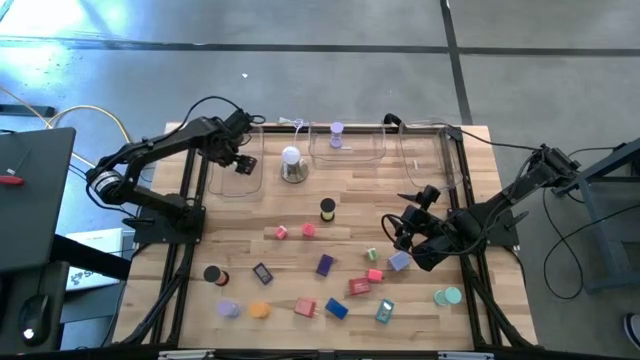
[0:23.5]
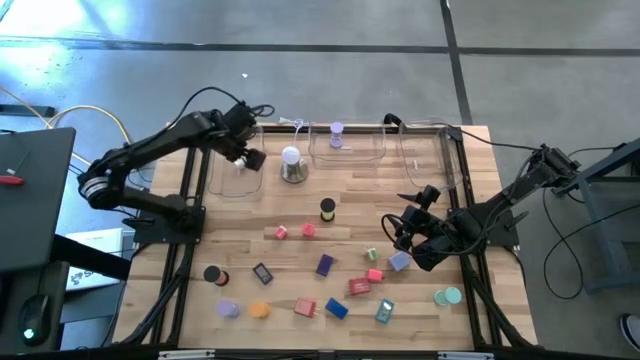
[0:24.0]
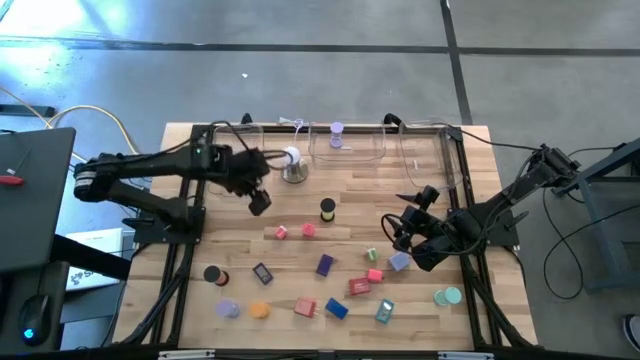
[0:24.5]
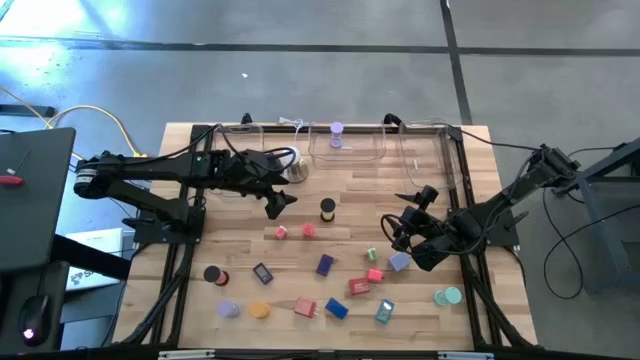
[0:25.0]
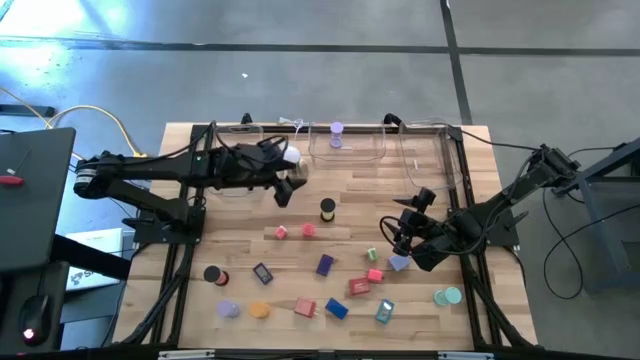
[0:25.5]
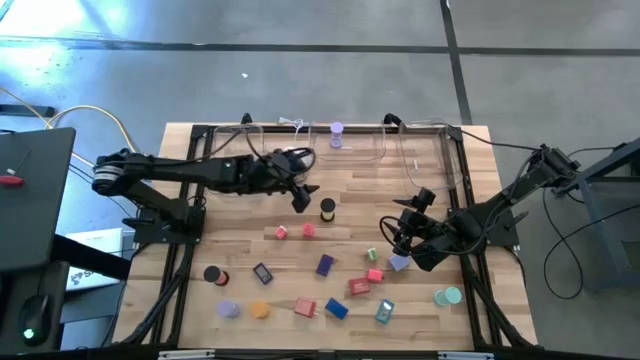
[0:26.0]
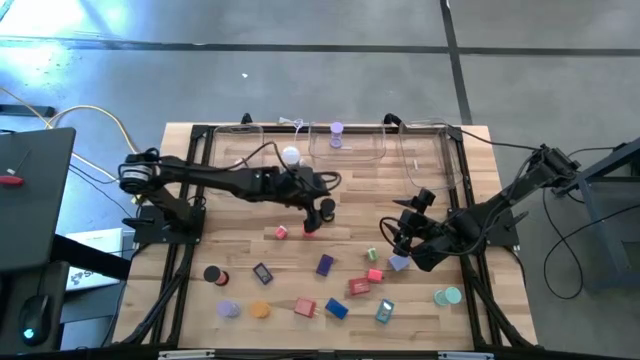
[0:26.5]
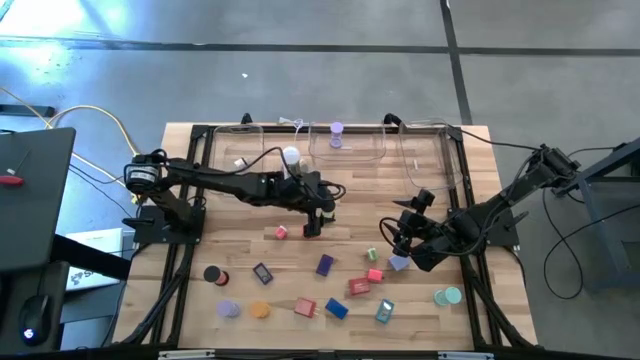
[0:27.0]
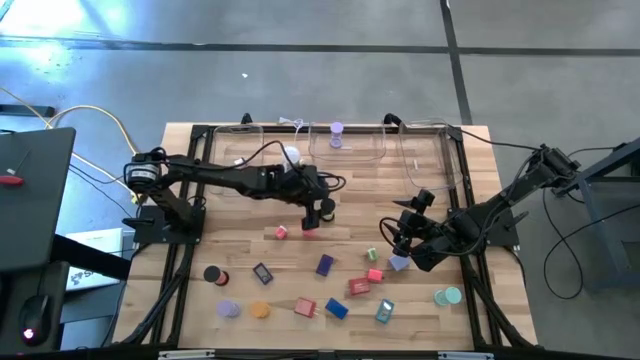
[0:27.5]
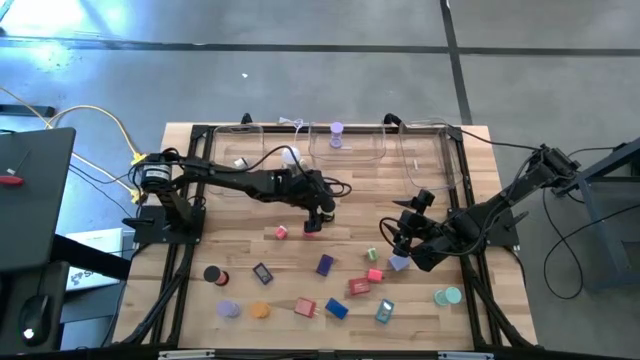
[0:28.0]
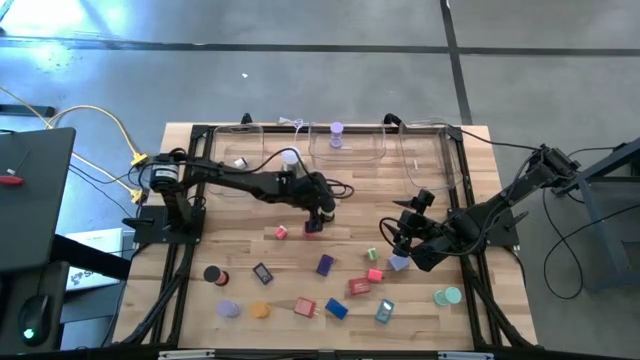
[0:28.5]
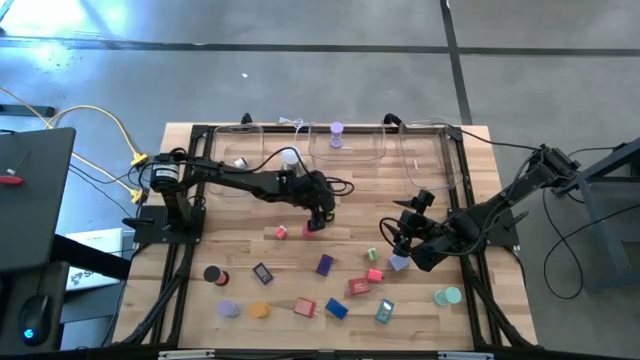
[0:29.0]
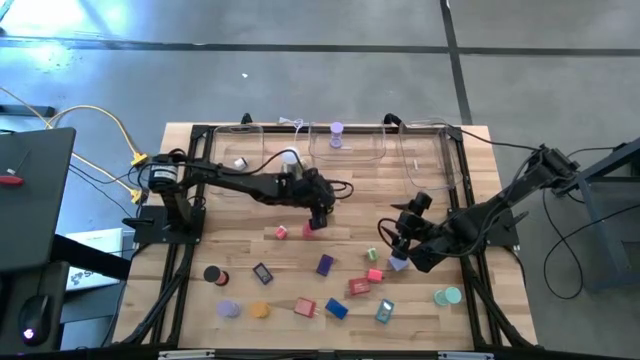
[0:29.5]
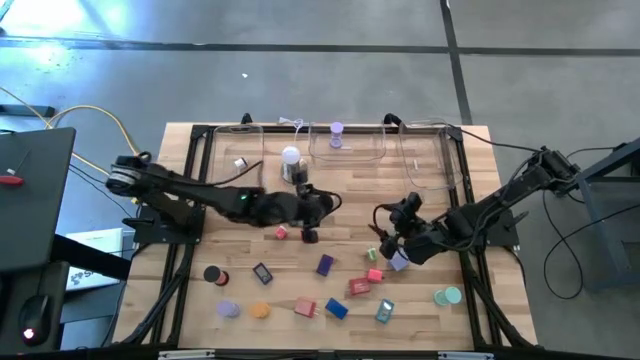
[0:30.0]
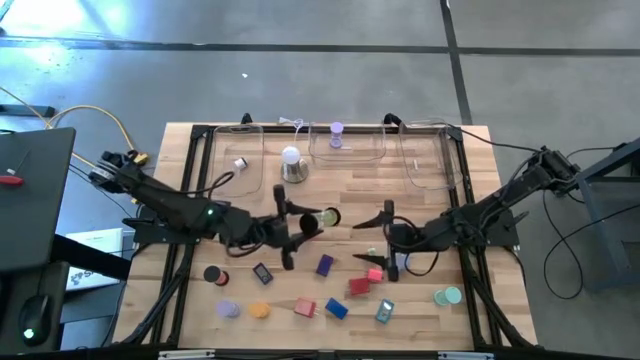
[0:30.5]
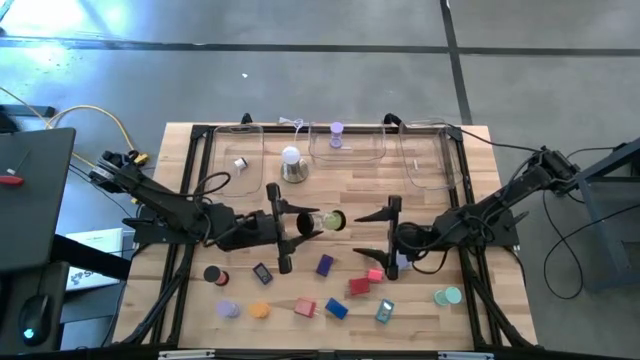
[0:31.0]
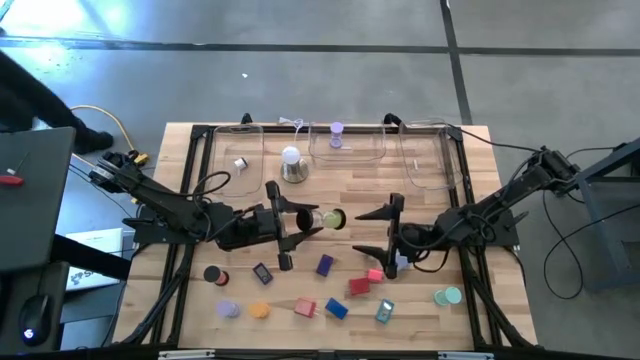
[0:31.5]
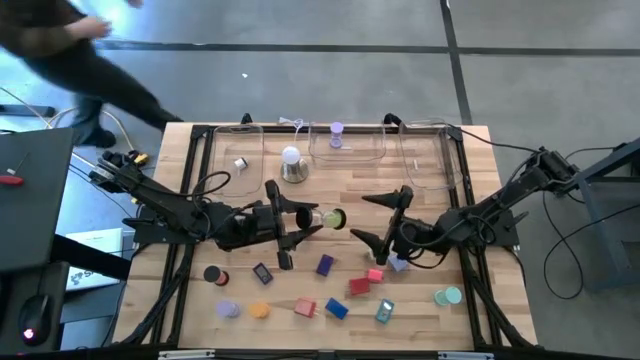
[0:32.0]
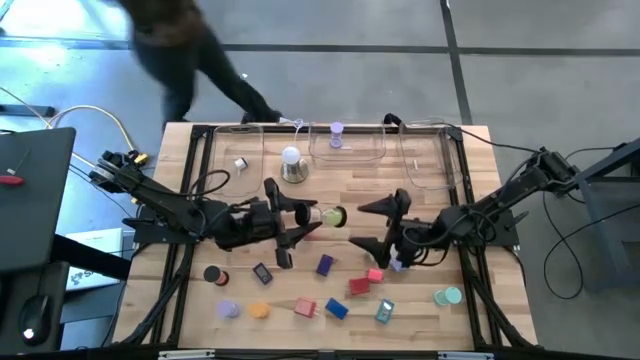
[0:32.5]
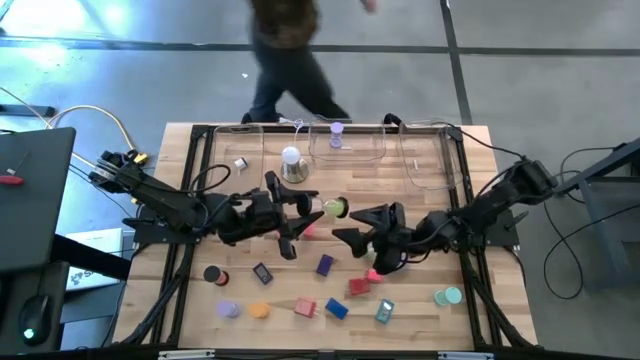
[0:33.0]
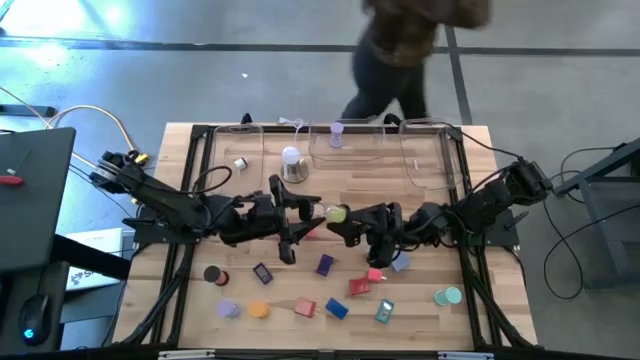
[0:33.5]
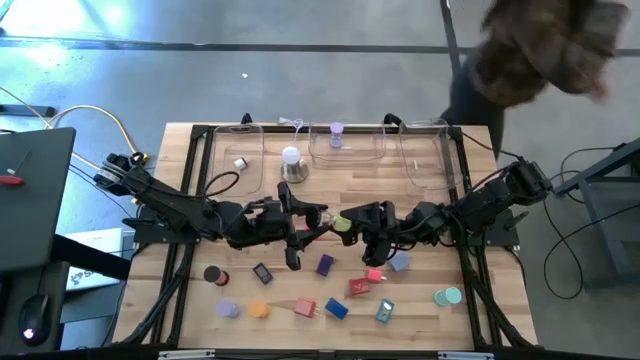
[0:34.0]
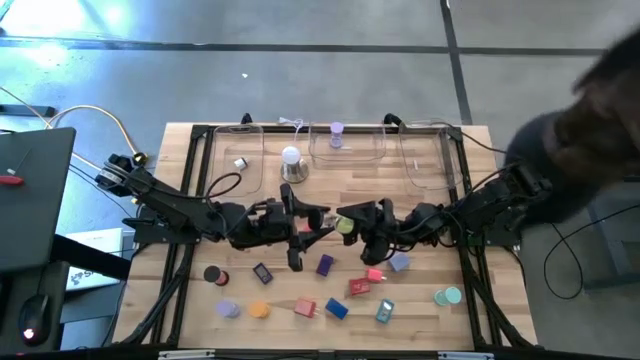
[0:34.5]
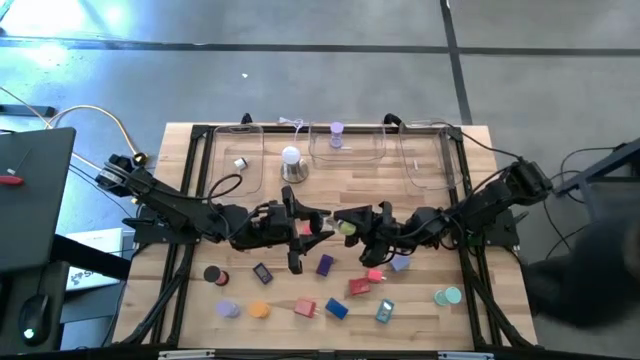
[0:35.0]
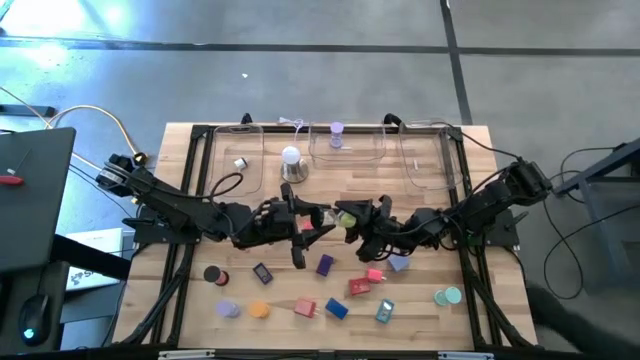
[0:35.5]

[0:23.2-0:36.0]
Task: Pick & Place Office items
Put the green hourglass into the middle transparent bin

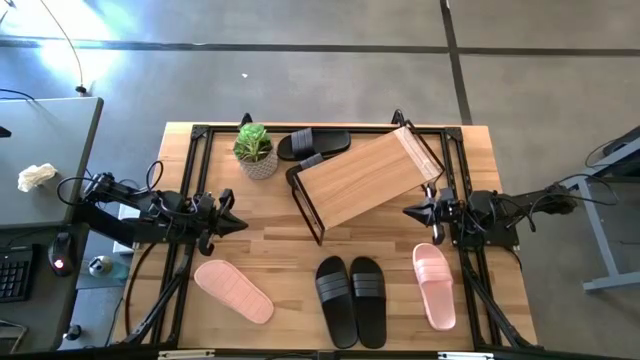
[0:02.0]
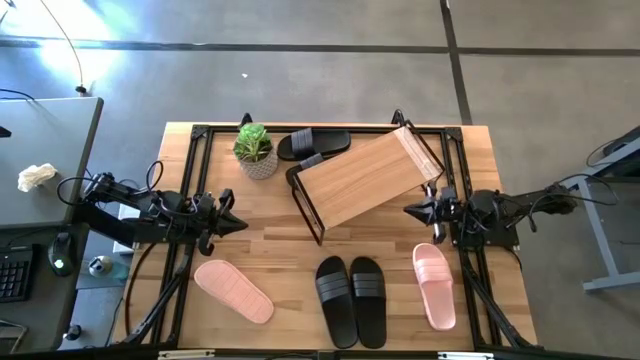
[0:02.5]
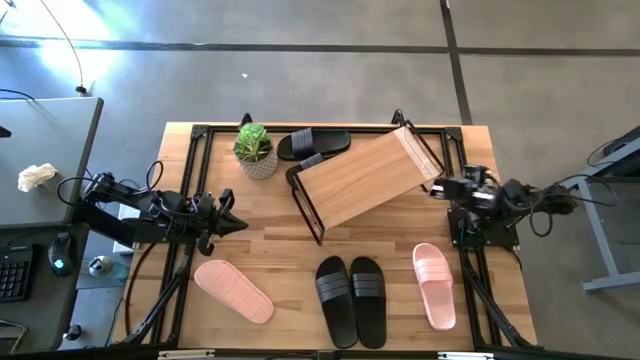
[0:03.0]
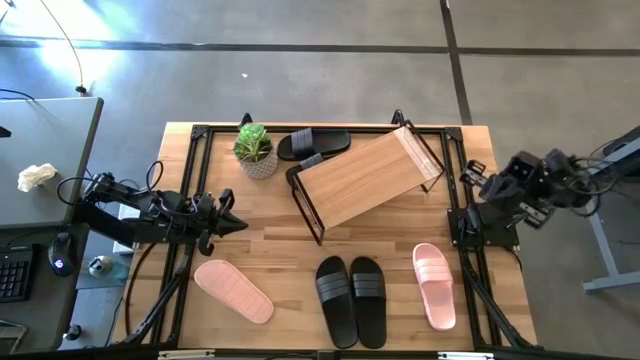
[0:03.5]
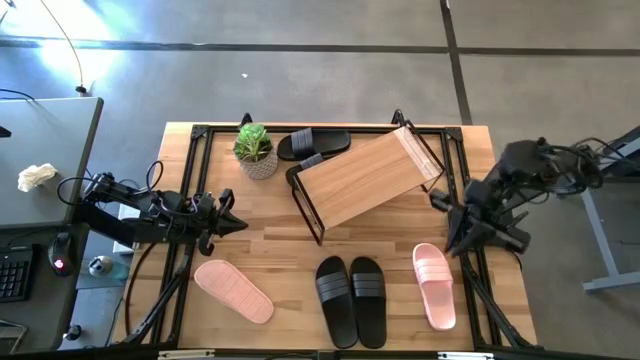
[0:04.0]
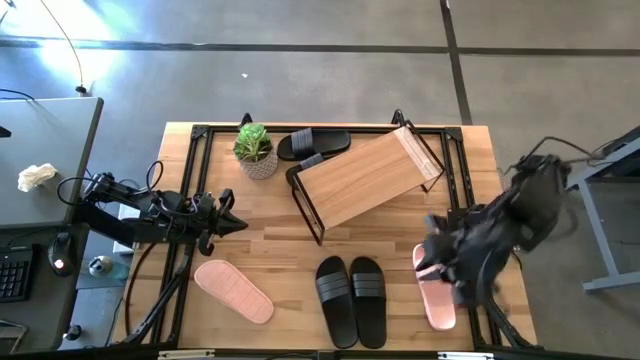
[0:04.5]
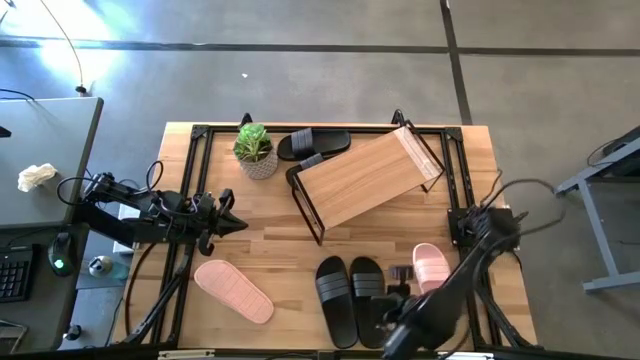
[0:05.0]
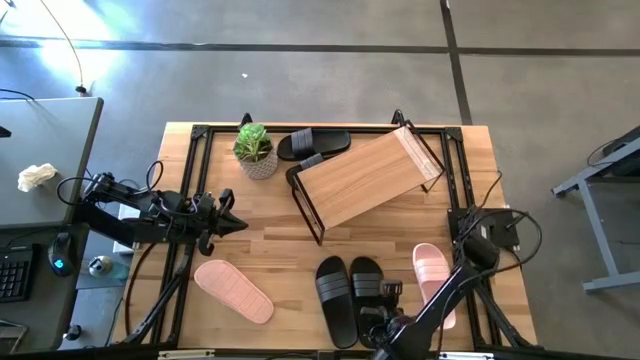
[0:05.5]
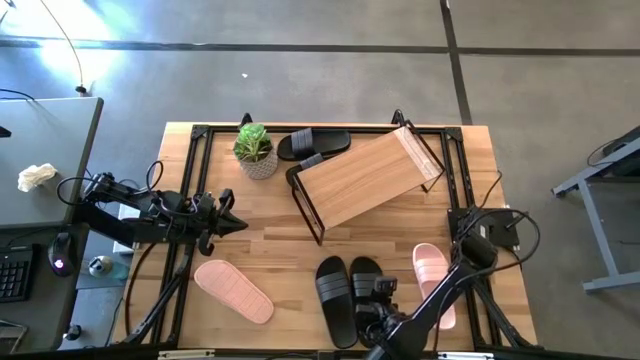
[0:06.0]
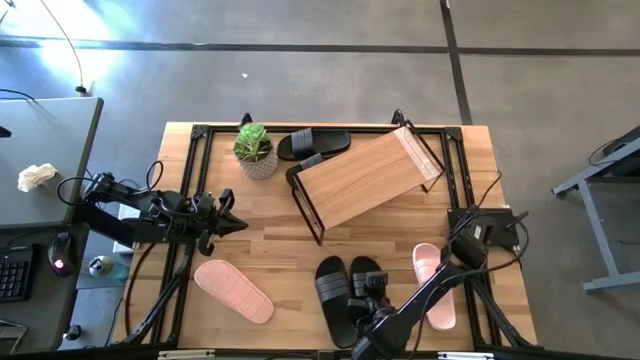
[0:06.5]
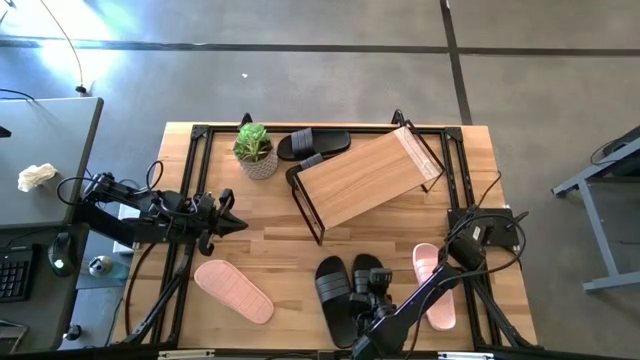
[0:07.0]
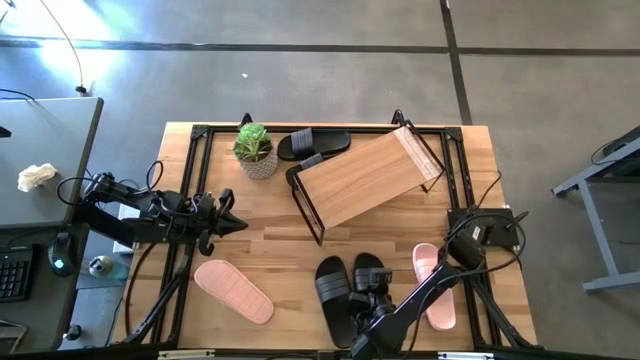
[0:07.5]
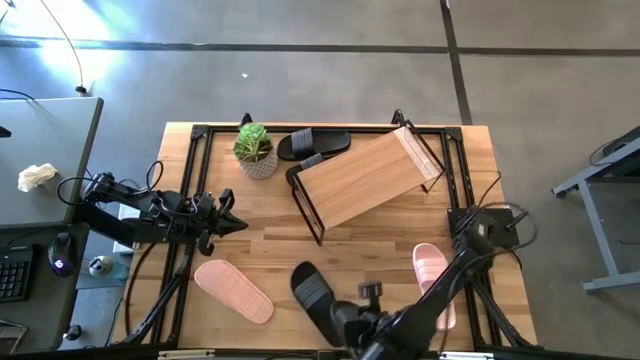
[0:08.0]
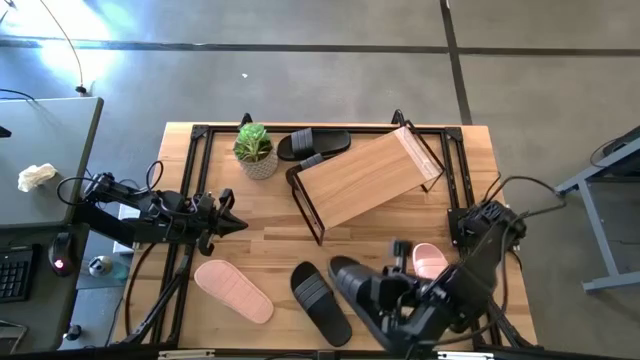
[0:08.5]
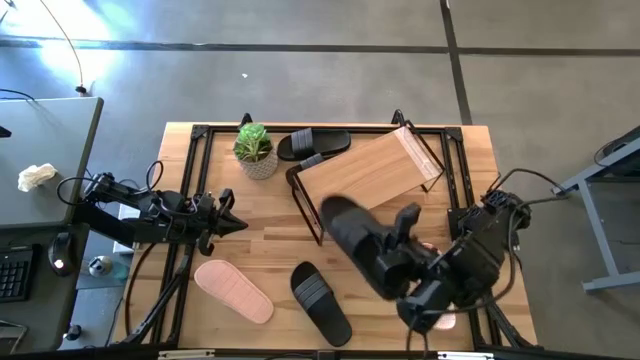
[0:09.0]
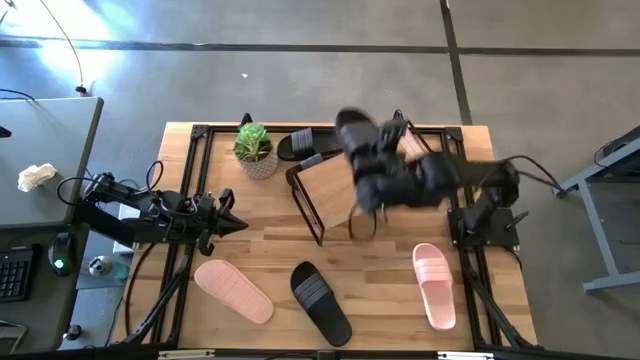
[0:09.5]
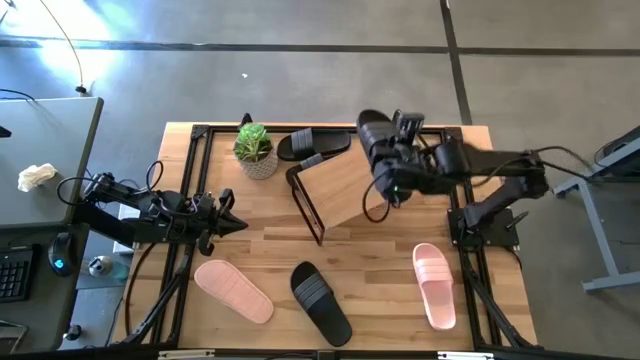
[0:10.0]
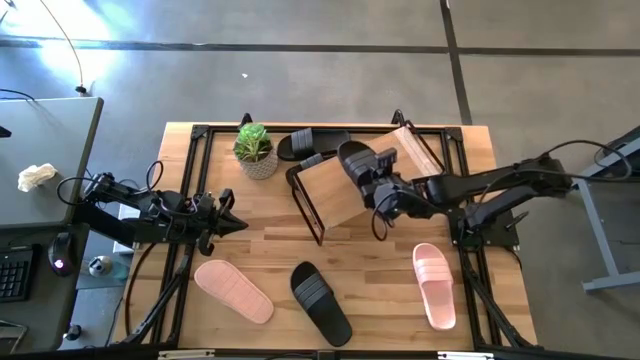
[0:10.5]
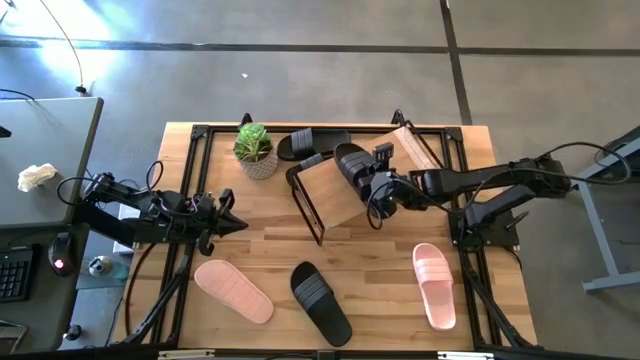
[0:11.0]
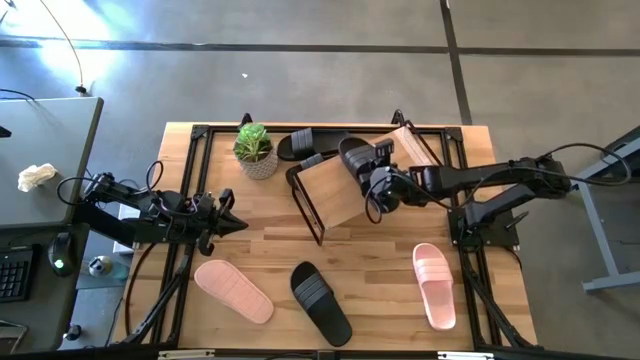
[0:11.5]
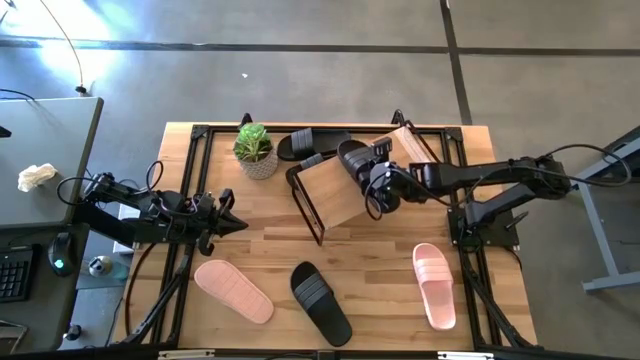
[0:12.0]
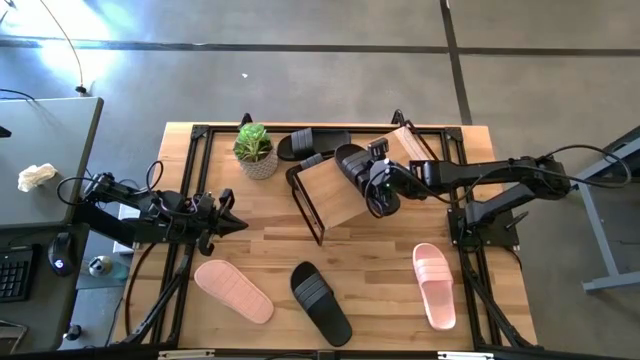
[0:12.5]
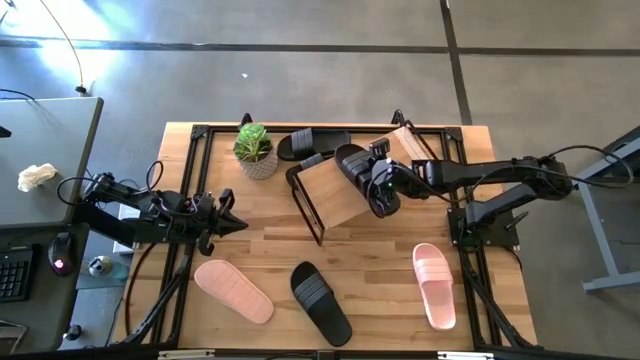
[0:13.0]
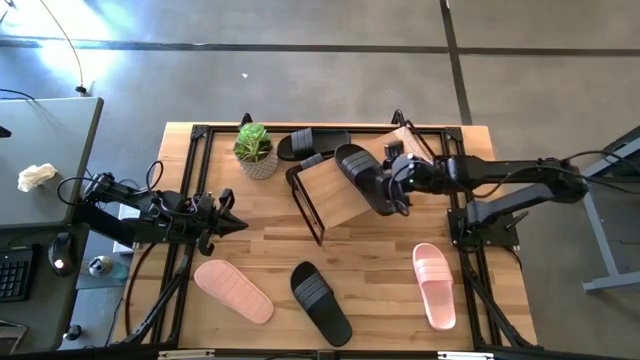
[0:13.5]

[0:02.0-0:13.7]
Task: Pick and place slides into the shelf
Put the bottom right black slipper on the shelf
